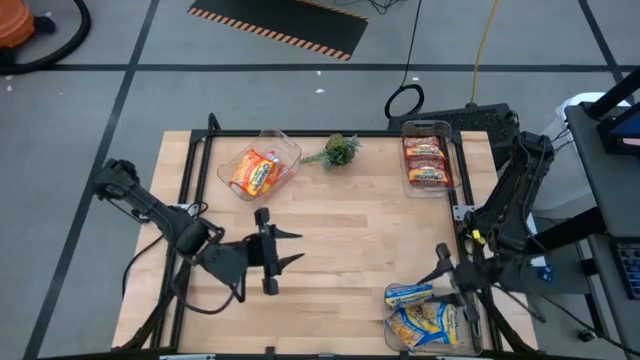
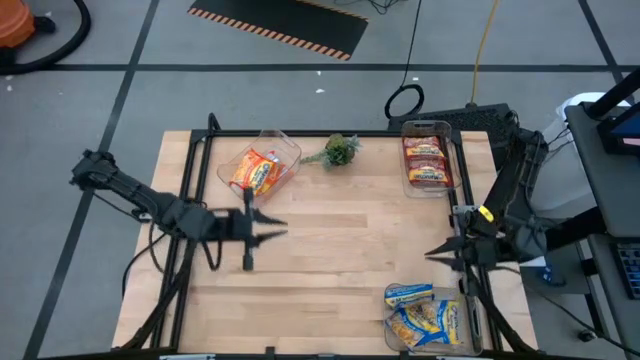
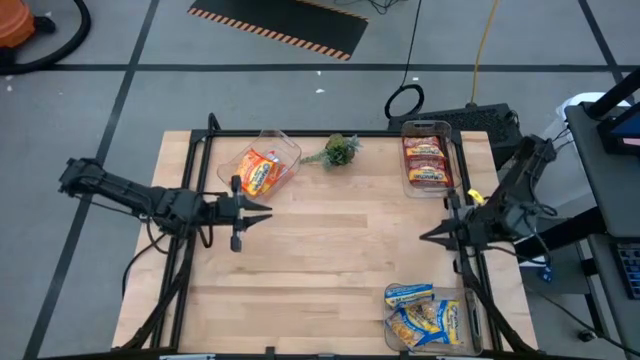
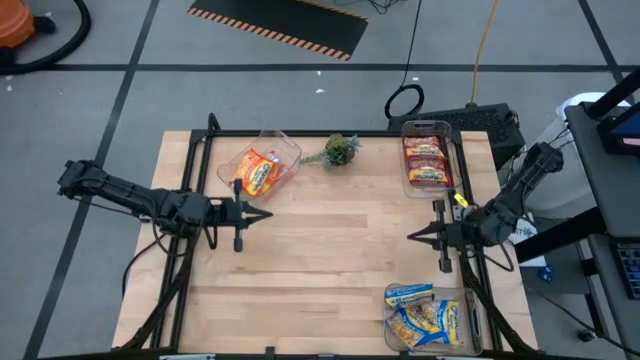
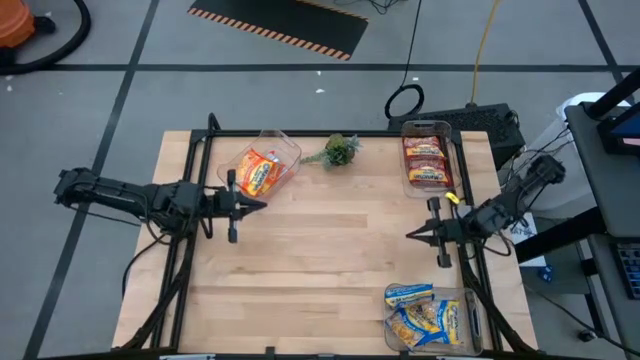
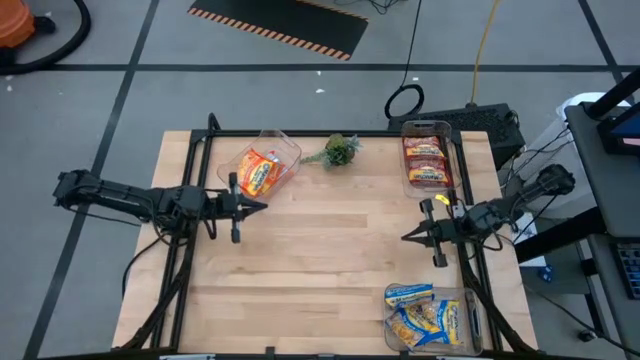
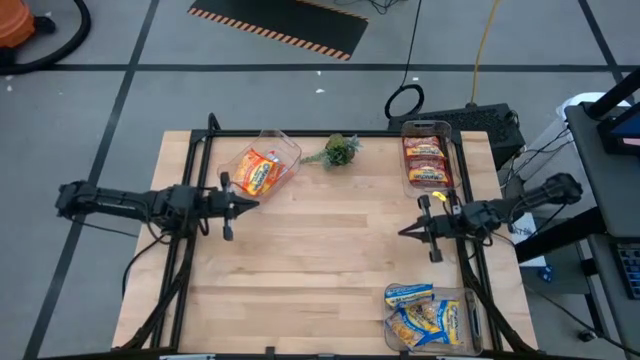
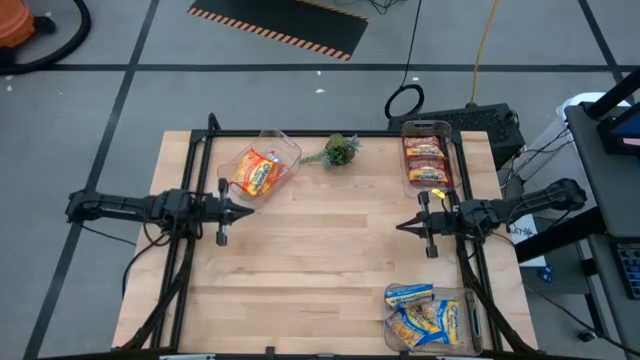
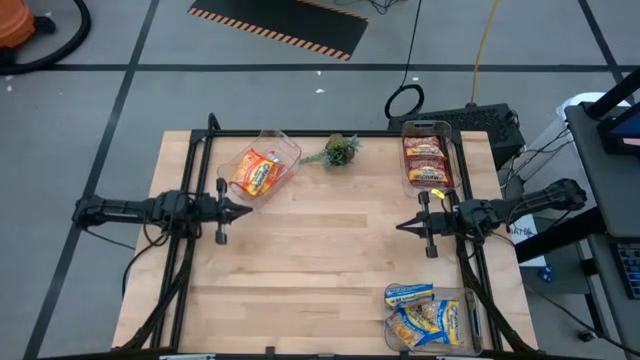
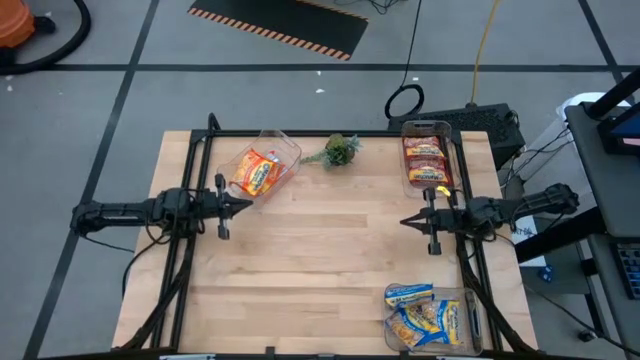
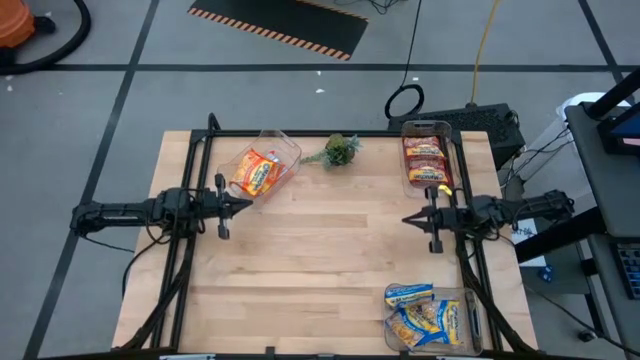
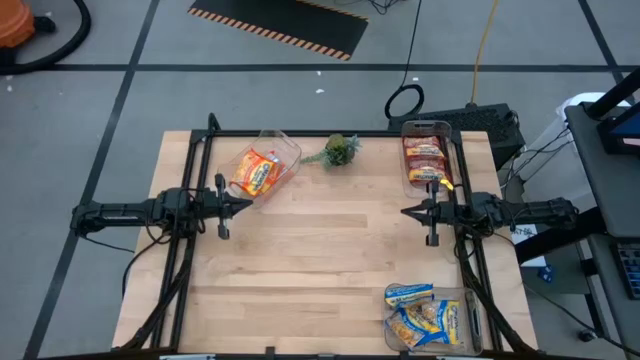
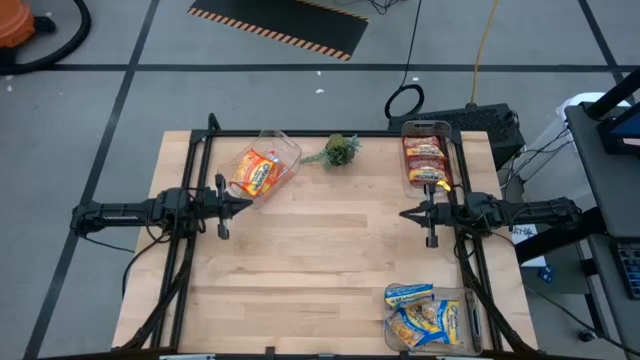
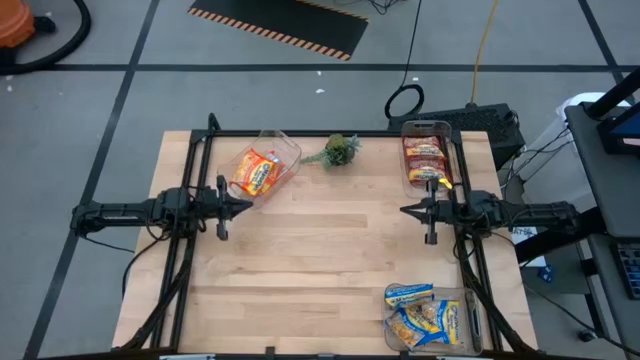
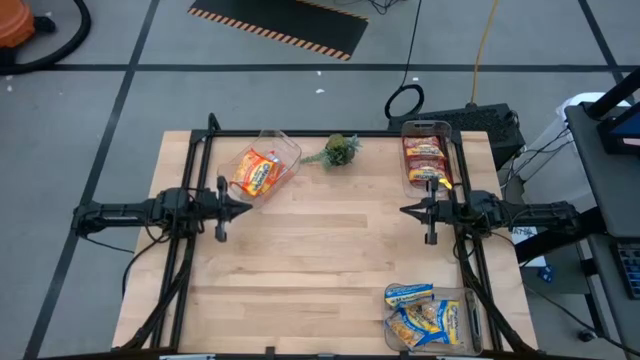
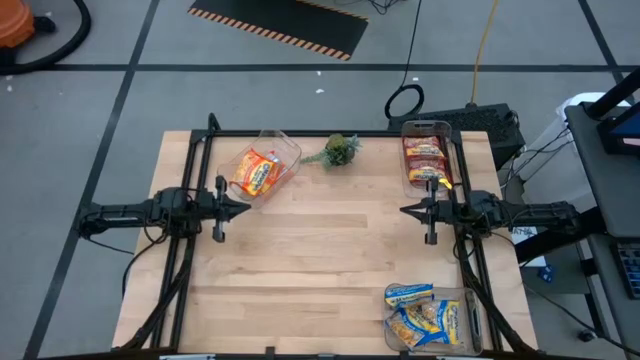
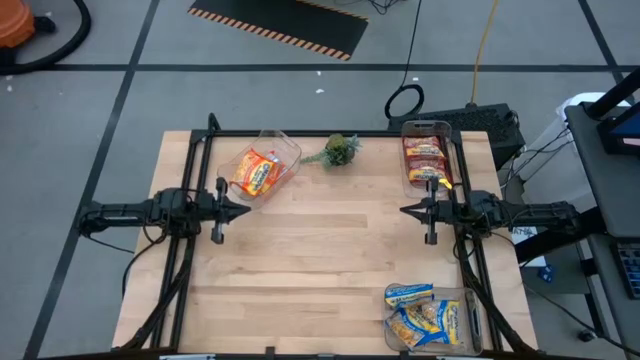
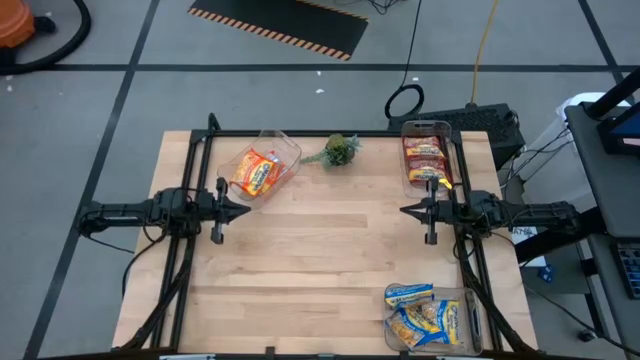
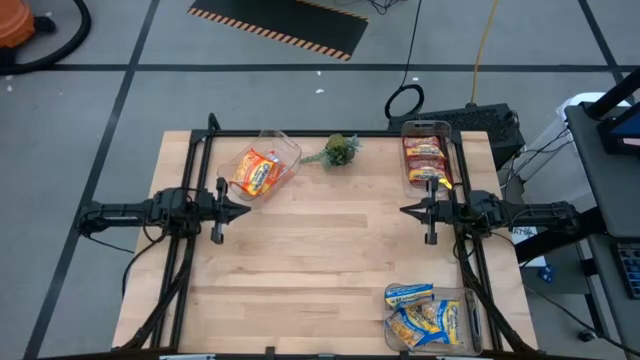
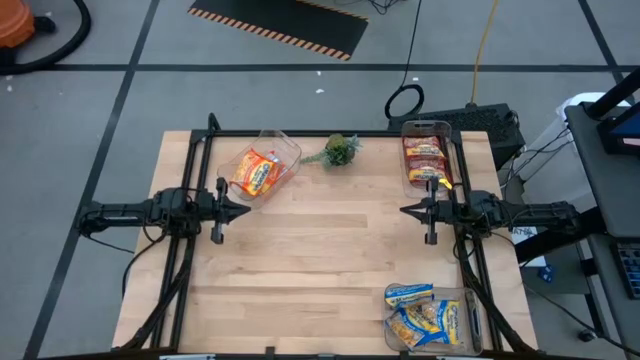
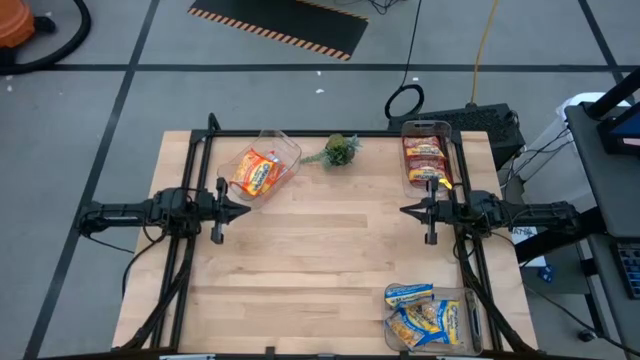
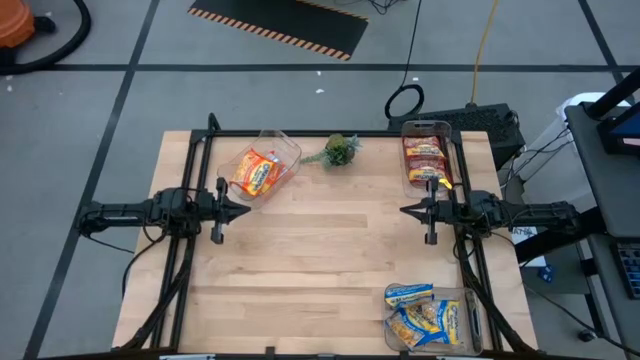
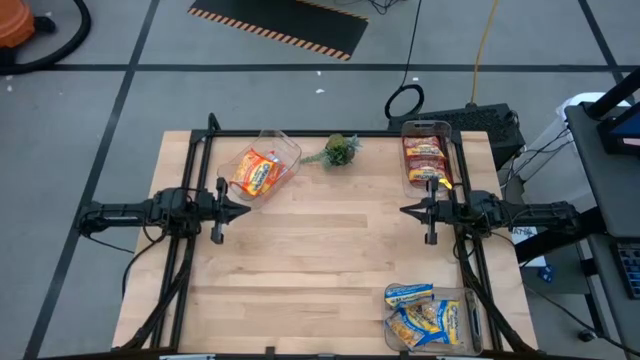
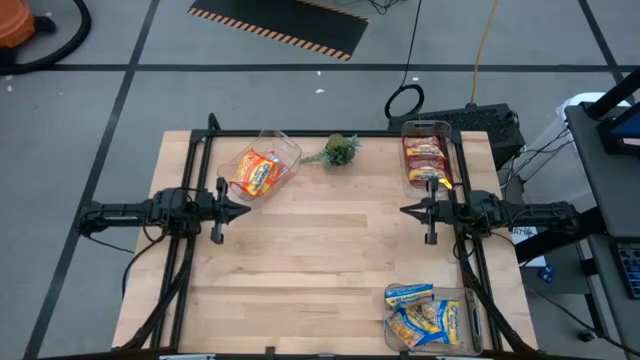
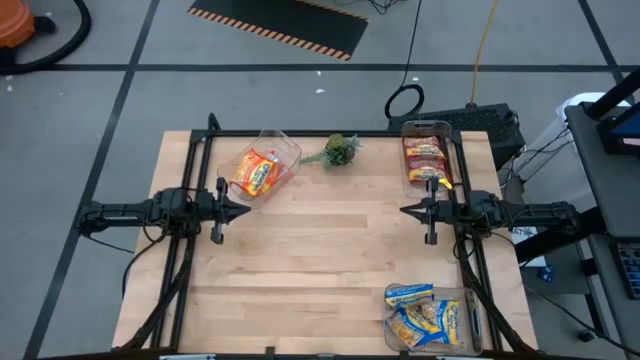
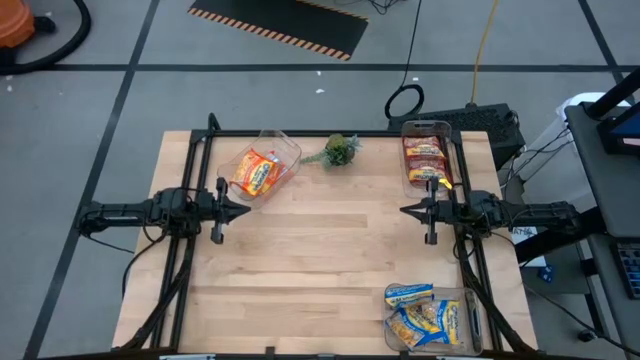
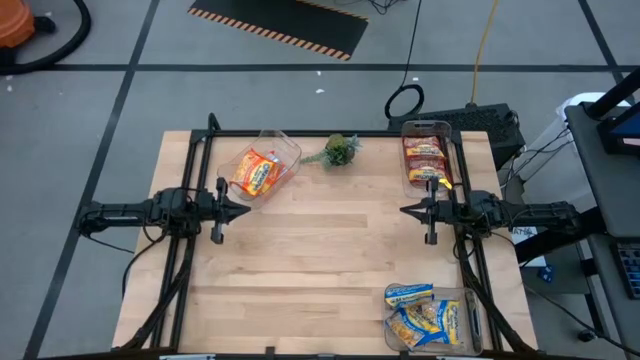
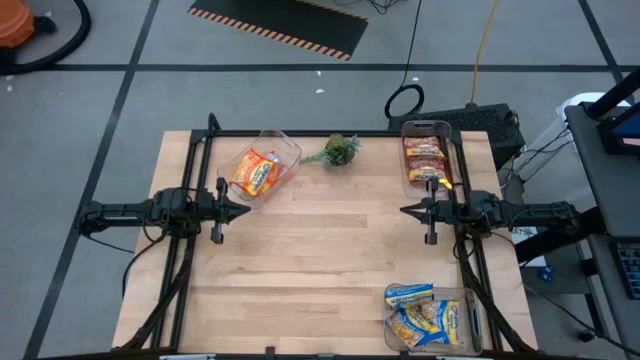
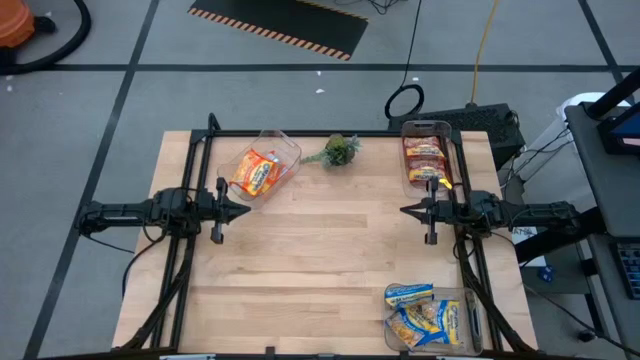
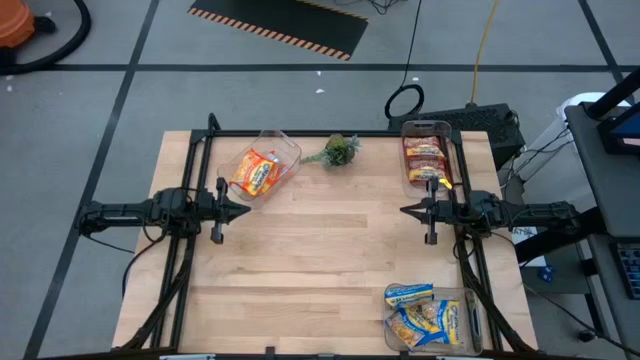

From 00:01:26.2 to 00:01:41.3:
Task: Sort Maruchan noodles
Return to Home Position

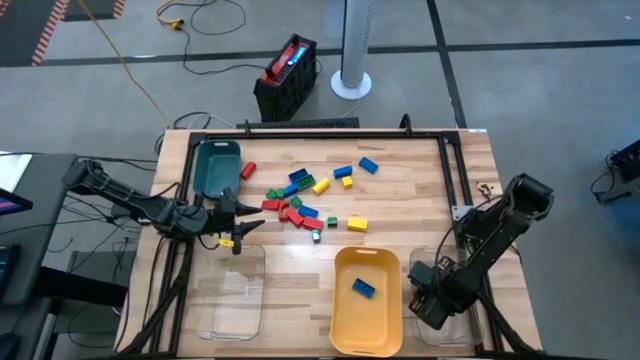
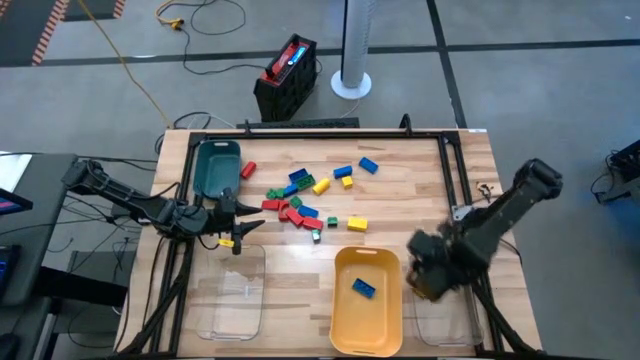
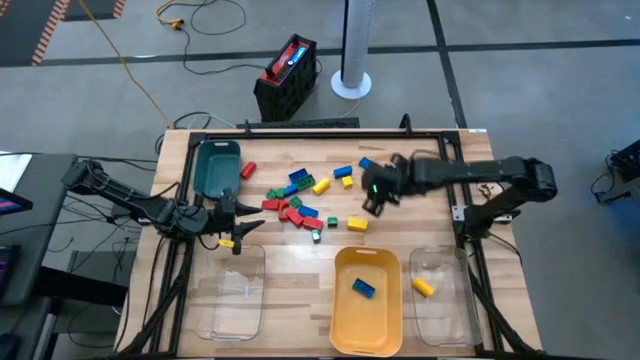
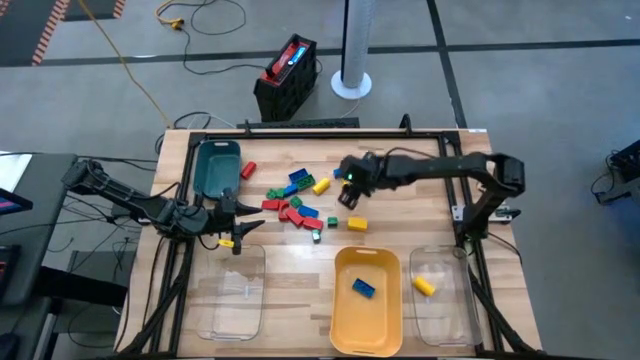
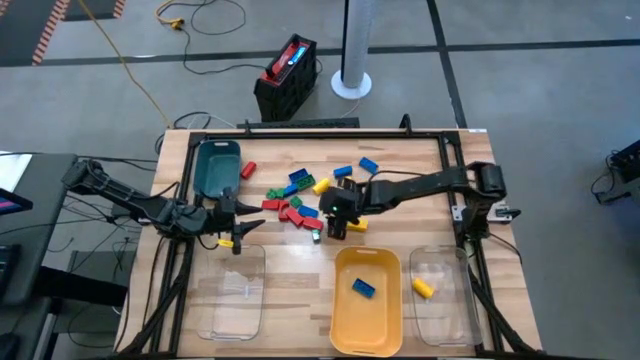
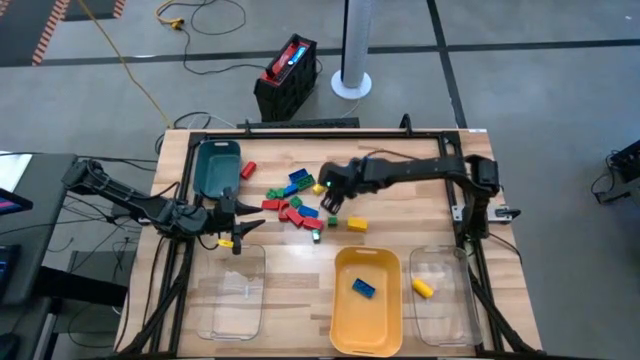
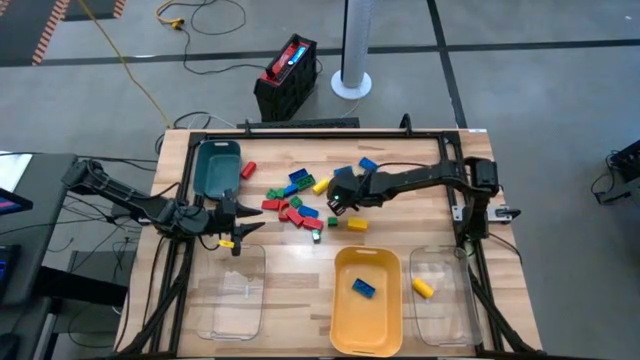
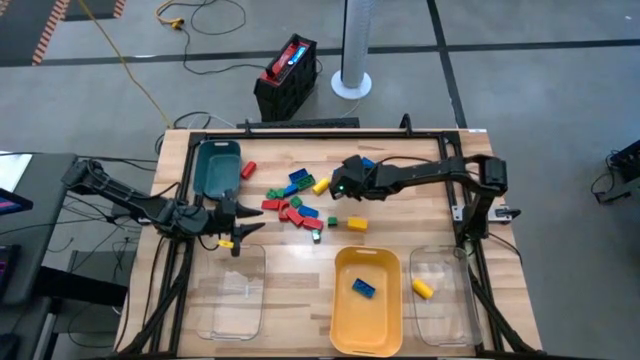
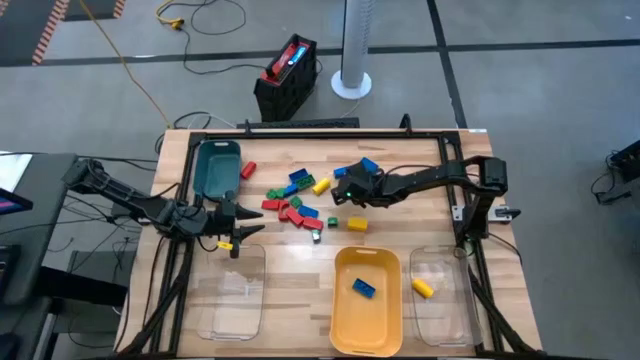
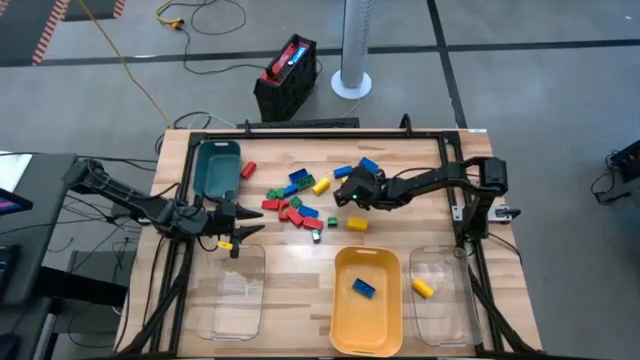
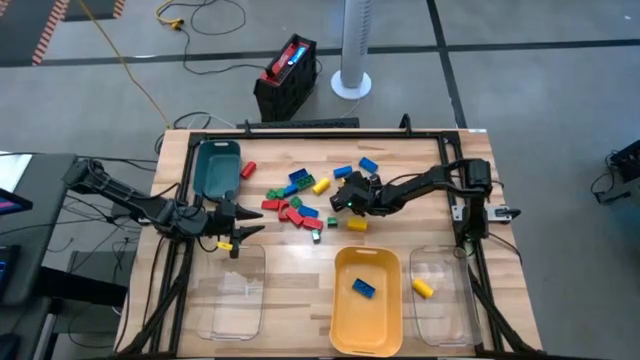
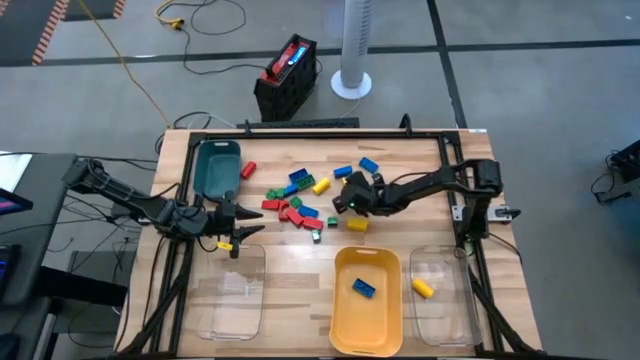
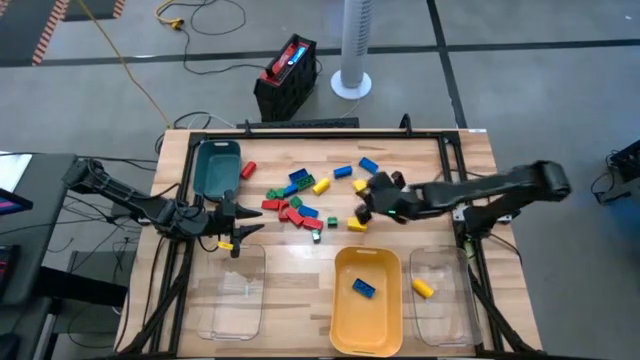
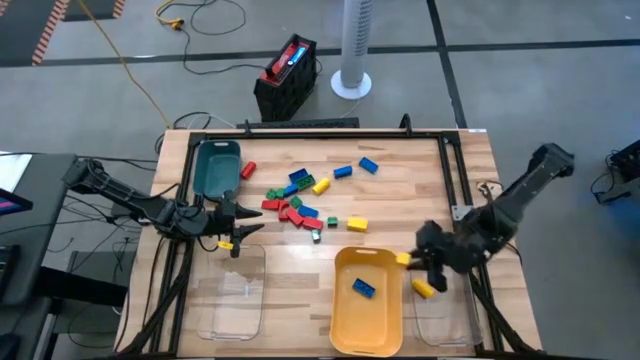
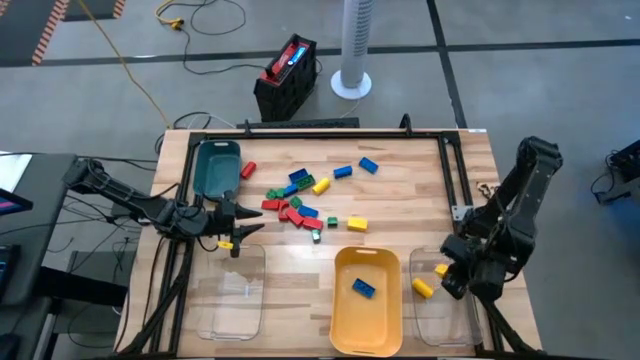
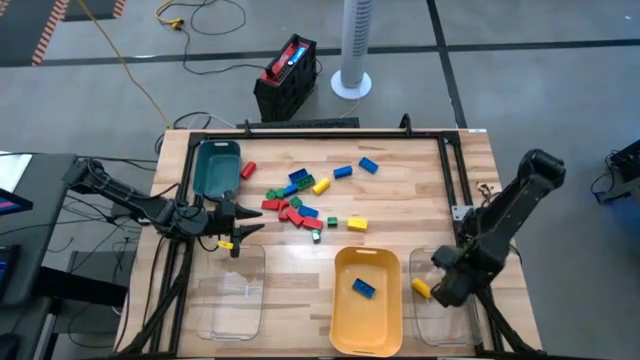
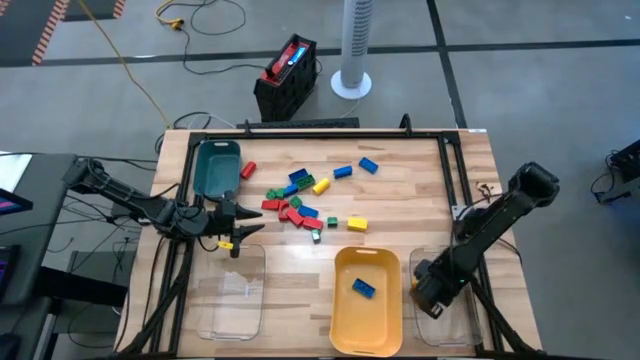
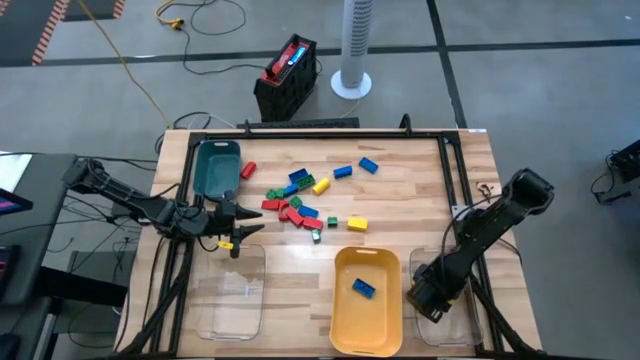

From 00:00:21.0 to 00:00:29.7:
Task: Sort blocks
Put the yellow wooden block into the right transparent bin
